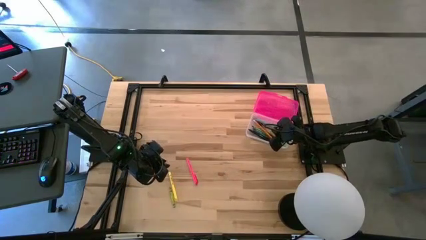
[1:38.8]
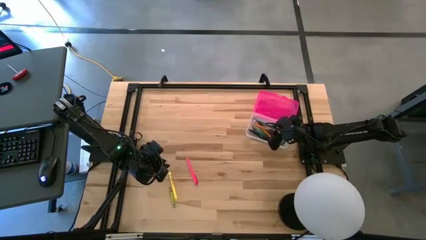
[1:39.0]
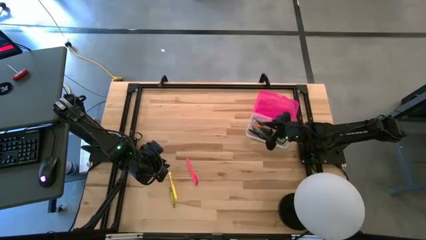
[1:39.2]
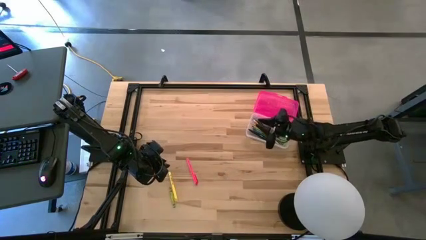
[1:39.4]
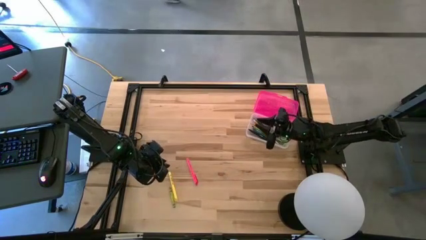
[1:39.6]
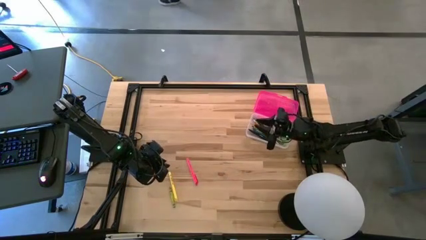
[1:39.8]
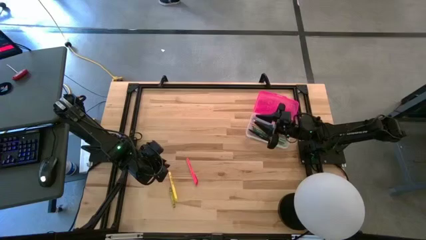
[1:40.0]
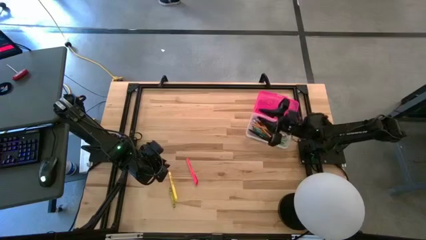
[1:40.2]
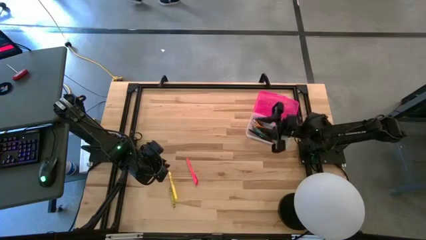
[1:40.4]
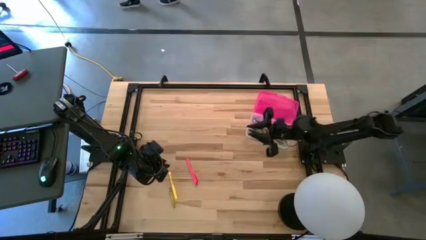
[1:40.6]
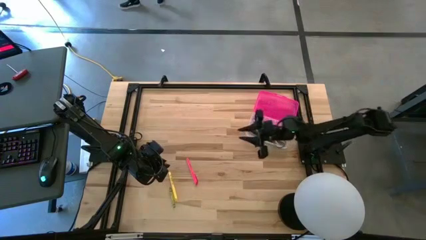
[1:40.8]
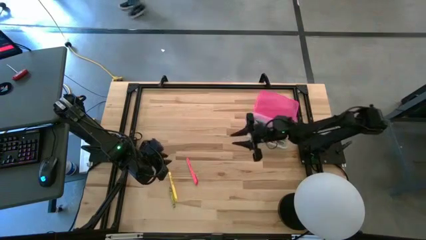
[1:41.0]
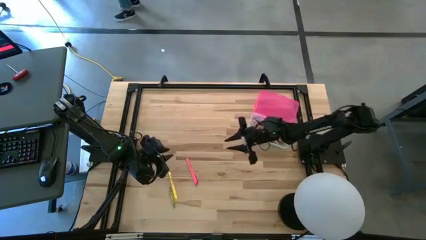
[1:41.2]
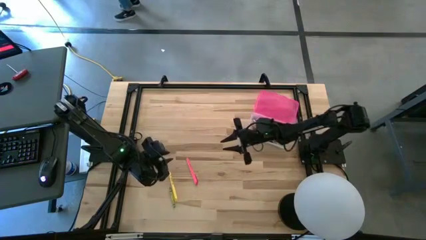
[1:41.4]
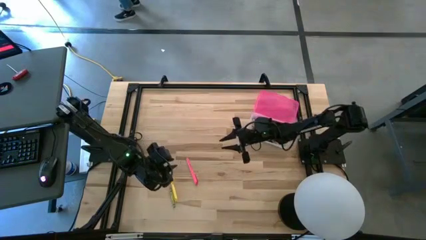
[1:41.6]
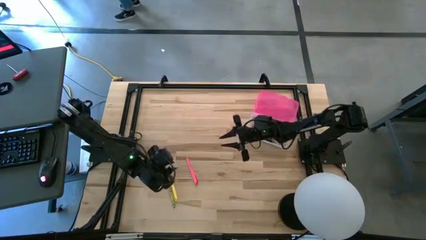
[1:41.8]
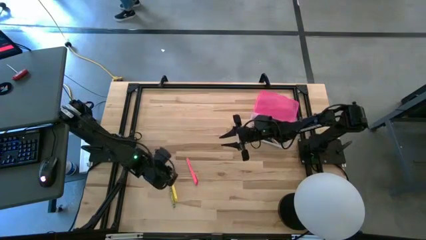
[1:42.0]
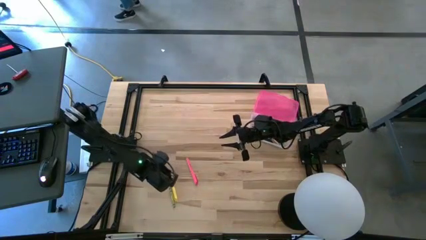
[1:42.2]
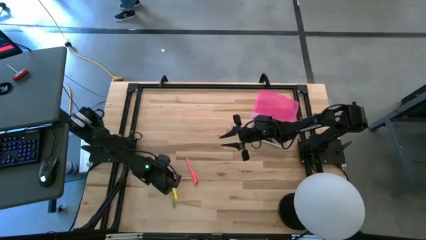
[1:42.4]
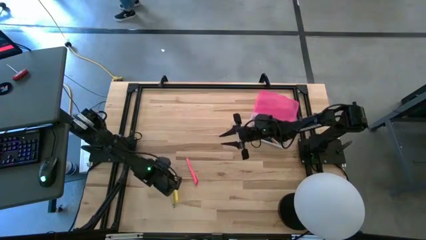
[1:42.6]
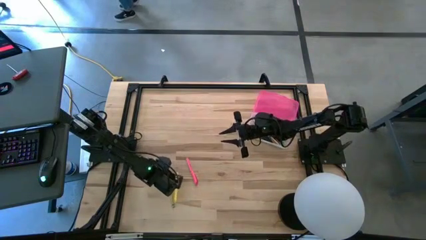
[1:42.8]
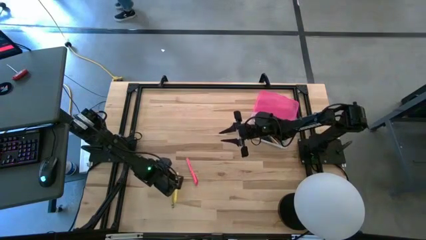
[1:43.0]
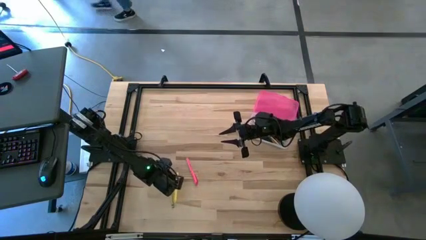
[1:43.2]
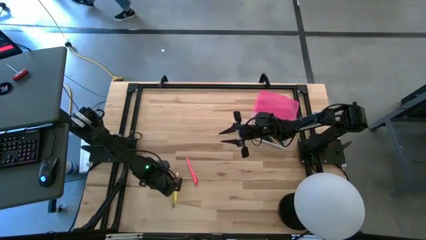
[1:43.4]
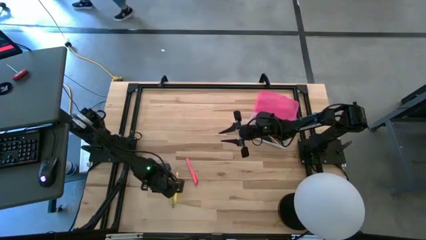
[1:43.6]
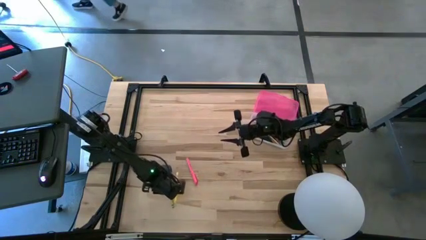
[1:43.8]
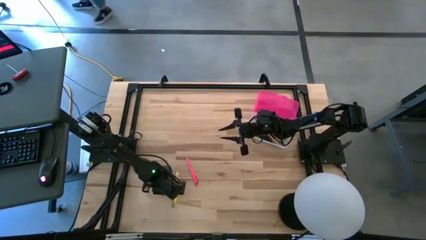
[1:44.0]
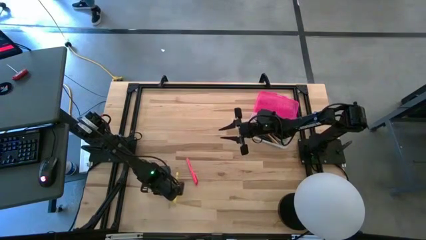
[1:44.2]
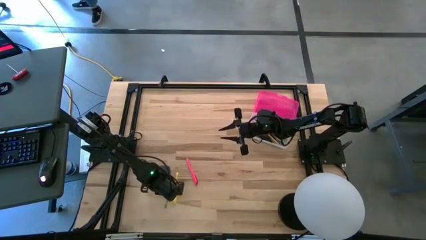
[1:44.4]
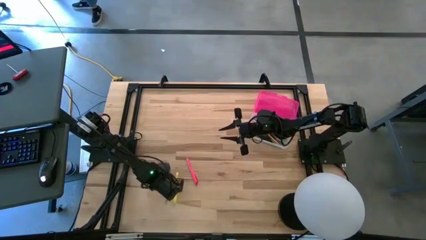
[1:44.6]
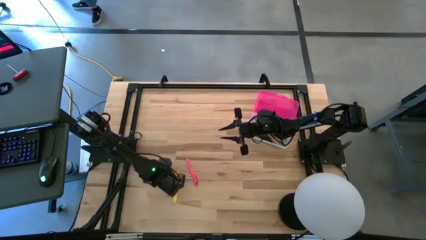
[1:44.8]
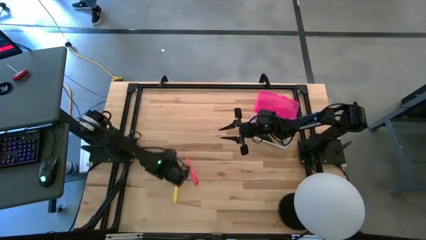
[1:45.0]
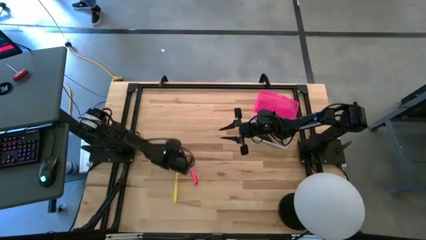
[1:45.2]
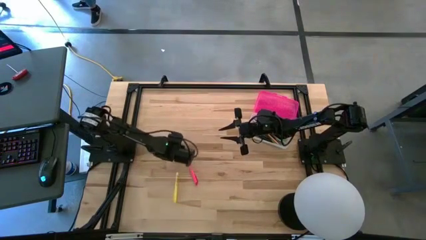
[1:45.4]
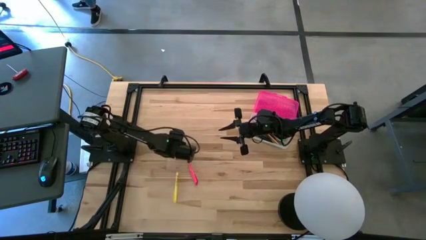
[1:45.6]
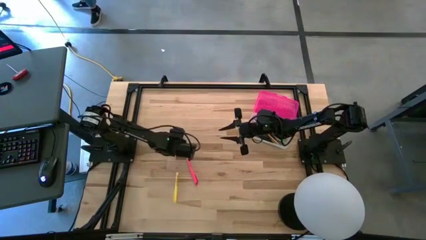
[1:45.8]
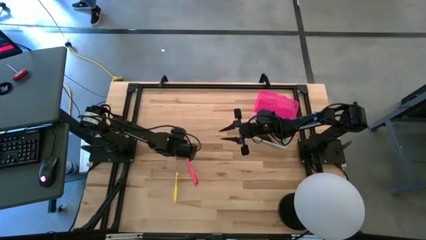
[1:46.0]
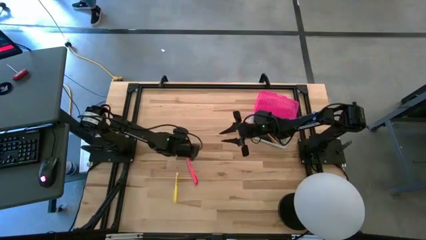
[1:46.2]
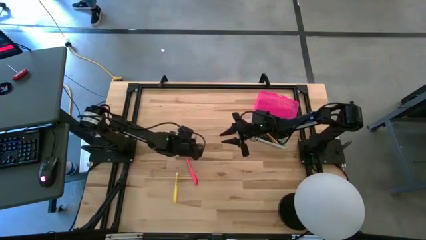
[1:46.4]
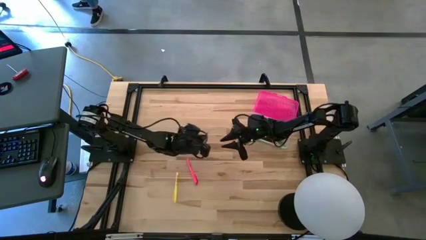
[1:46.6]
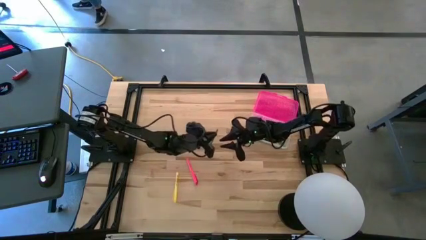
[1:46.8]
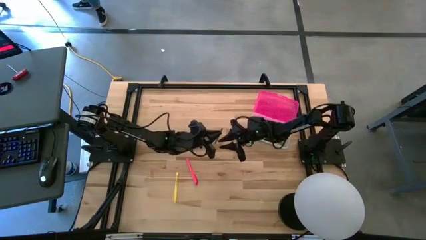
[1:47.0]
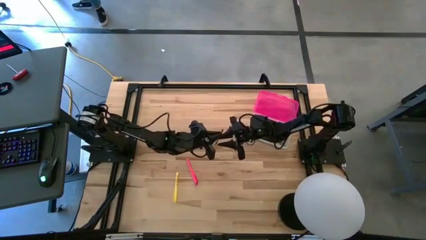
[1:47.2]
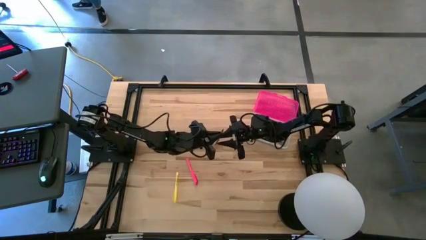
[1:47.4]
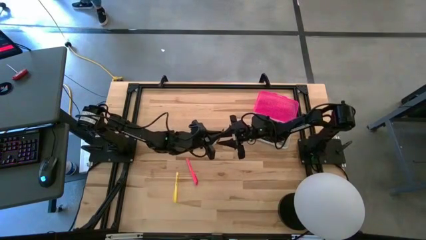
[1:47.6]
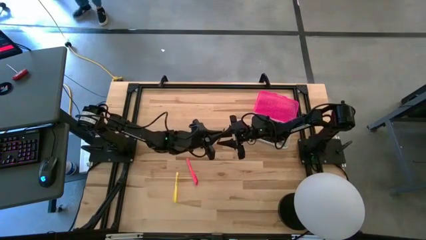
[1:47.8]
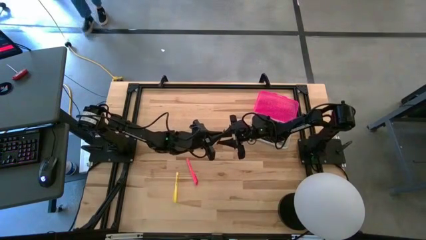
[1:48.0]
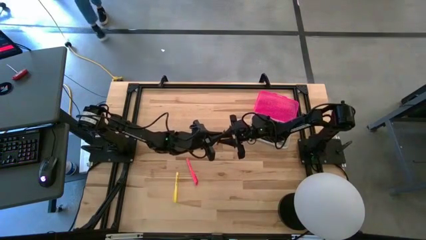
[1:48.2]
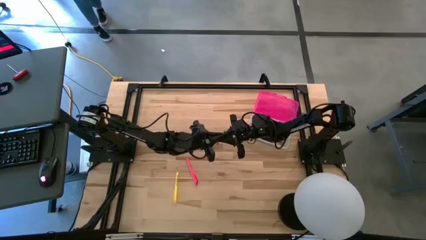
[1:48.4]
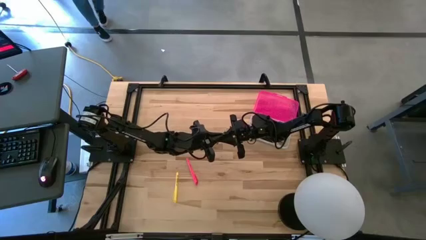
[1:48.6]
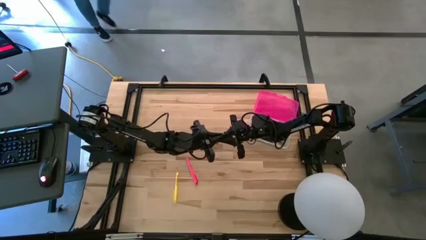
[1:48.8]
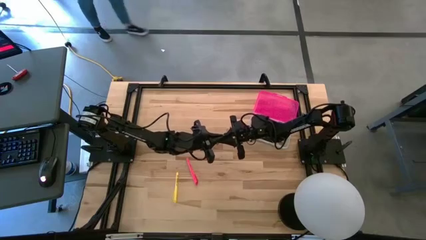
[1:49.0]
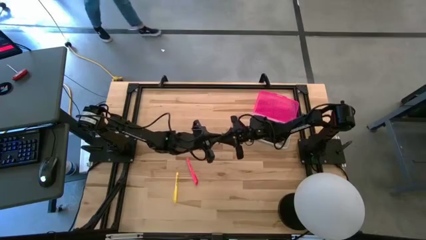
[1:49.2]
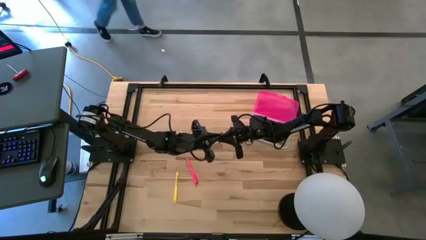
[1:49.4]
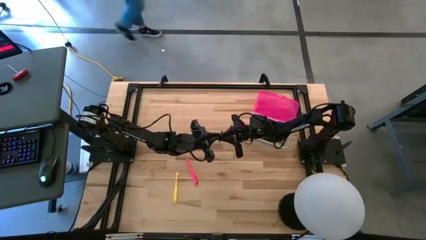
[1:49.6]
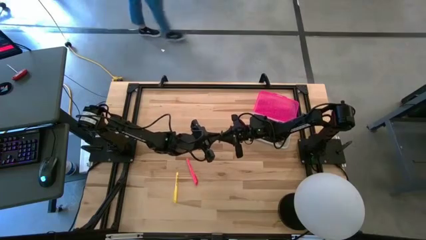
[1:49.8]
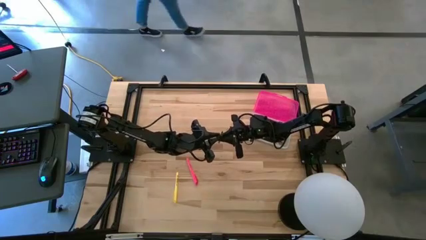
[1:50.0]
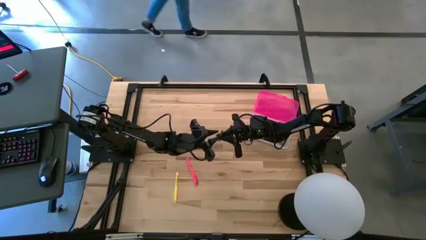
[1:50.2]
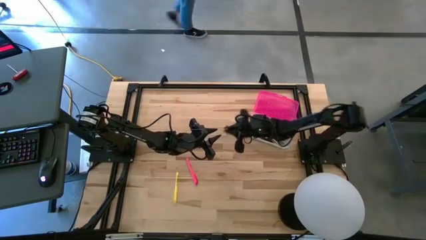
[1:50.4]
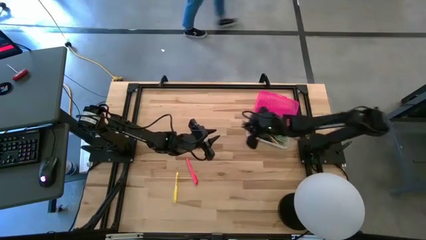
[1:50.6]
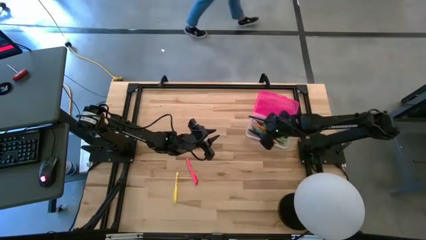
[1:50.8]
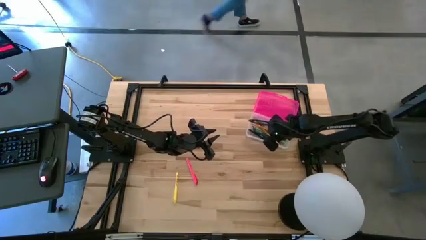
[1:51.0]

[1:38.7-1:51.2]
Task: Pick & place school supplies into a supply box
Put the green crayon into the pink supply box

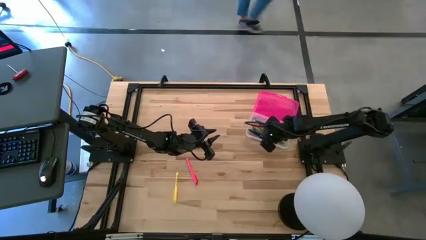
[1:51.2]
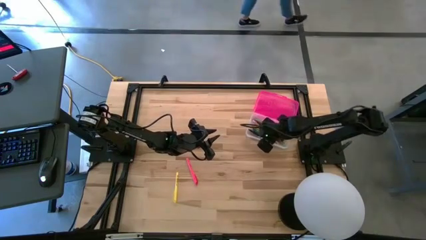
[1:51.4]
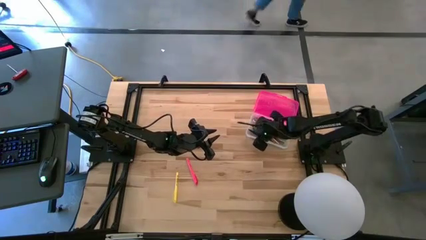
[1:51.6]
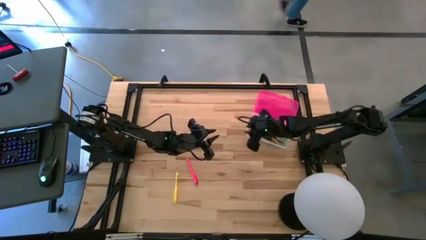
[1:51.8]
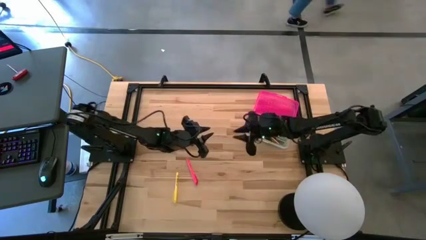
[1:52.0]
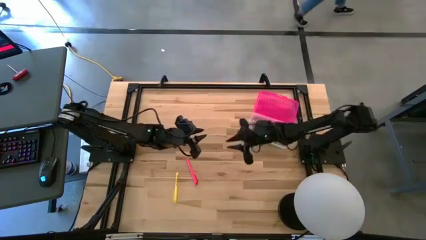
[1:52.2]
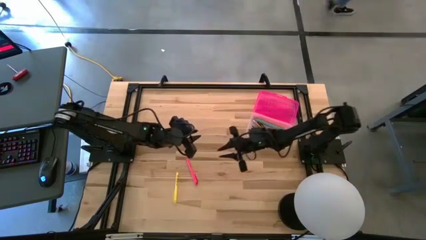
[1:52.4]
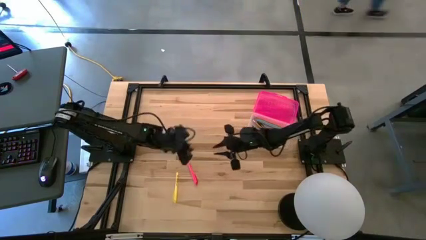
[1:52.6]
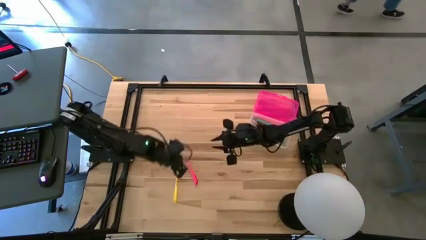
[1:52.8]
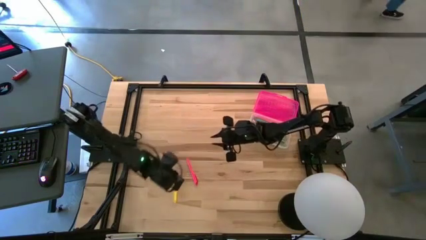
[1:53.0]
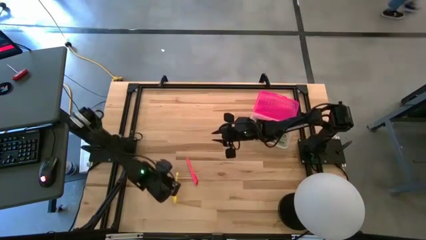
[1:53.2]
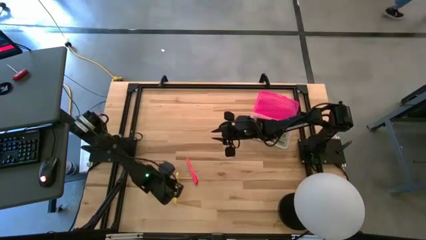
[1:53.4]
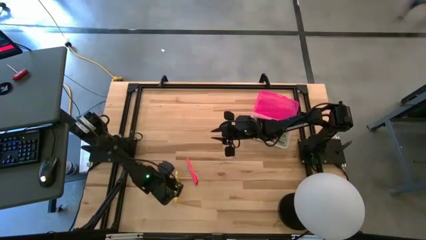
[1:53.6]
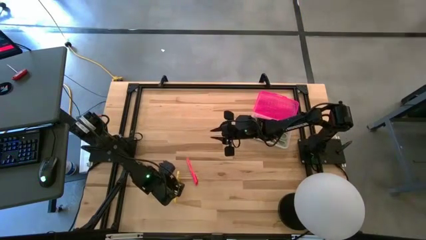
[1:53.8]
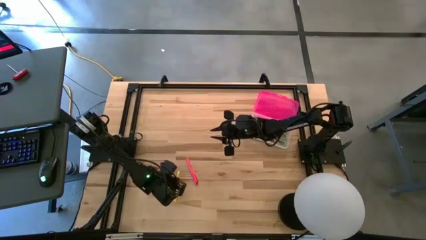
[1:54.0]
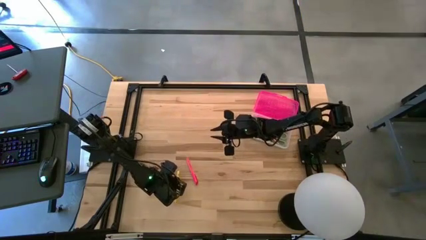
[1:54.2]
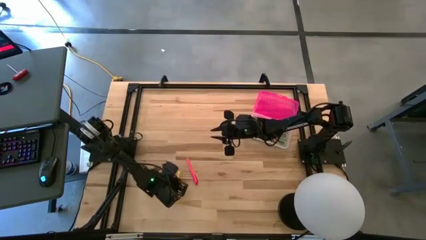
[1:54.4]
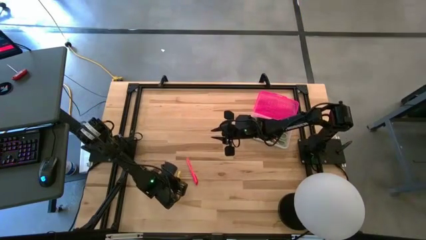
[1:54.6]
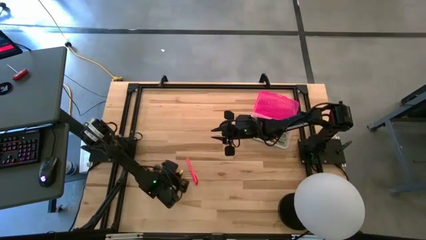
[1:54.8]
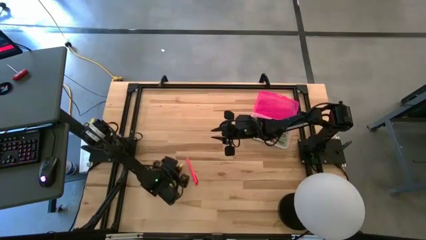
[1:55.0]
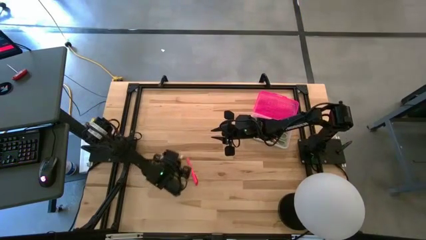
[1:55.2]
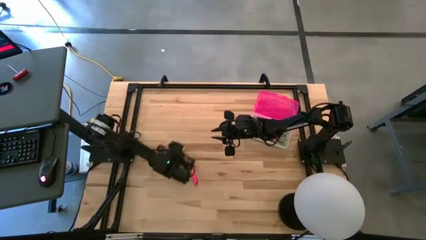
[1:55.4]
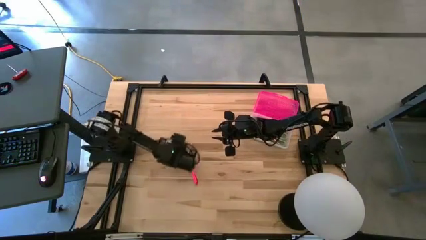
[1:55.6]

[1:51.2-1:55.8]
Put the yellow pen into the pink supply box
